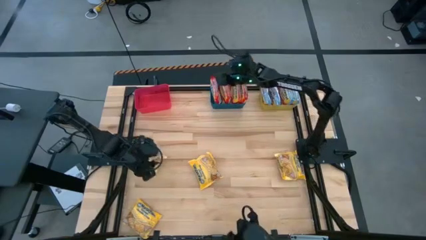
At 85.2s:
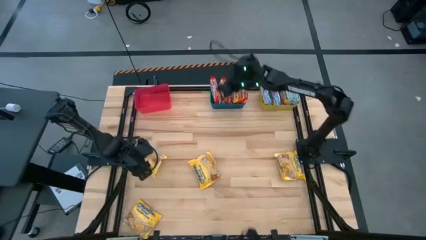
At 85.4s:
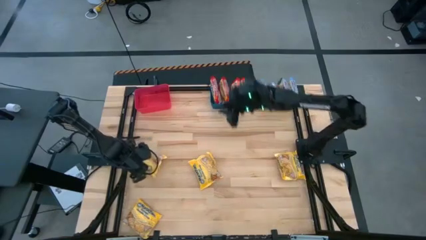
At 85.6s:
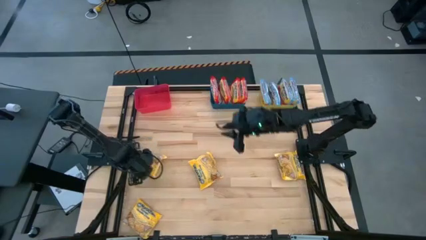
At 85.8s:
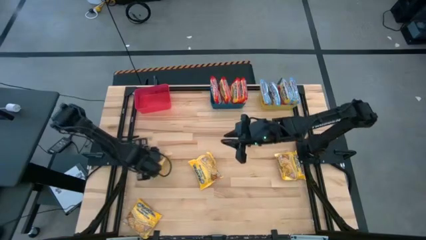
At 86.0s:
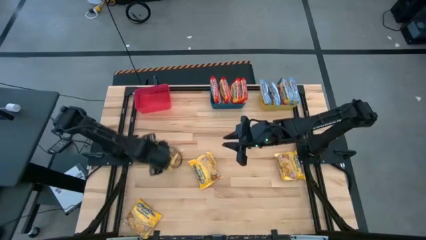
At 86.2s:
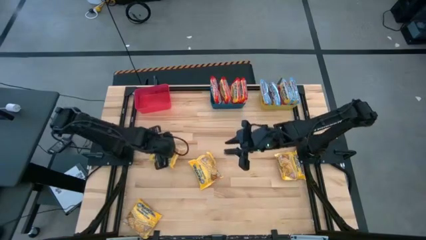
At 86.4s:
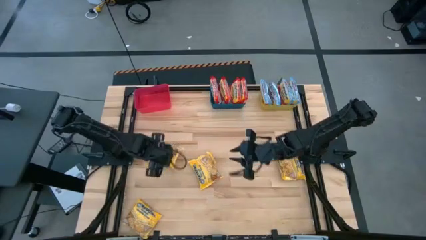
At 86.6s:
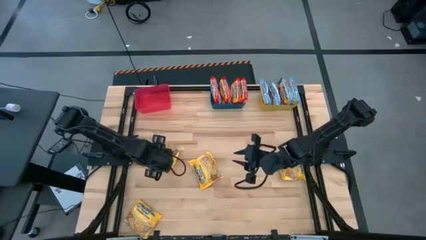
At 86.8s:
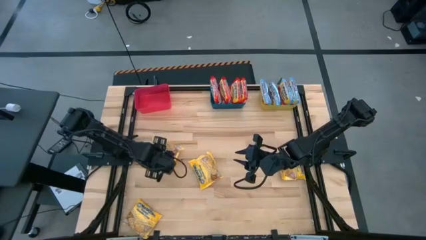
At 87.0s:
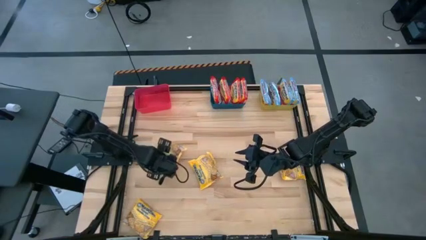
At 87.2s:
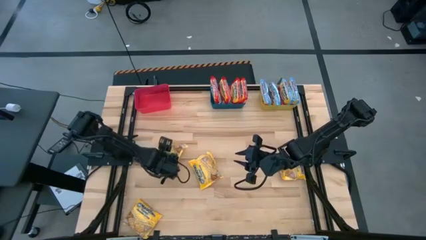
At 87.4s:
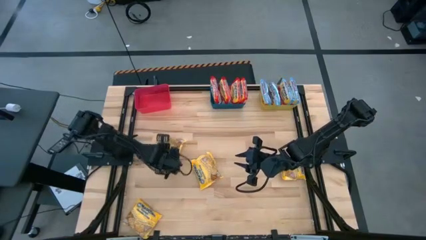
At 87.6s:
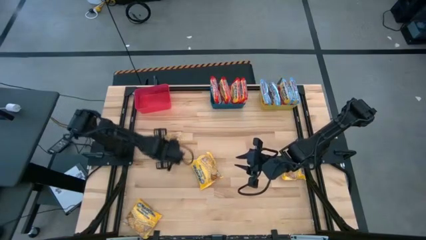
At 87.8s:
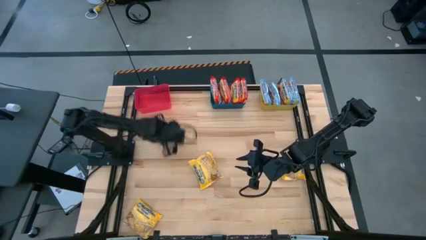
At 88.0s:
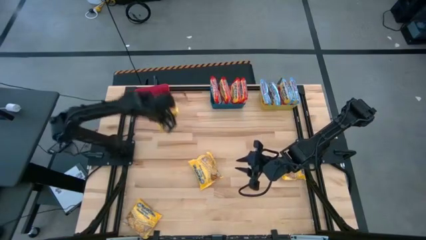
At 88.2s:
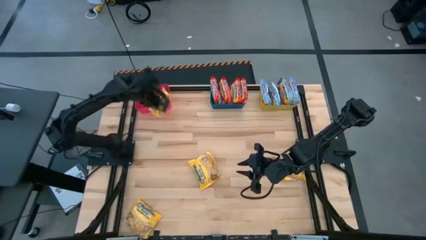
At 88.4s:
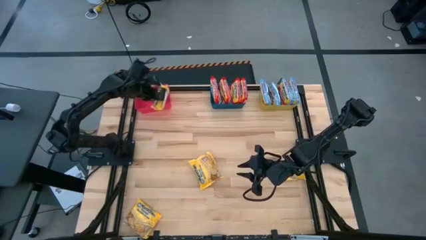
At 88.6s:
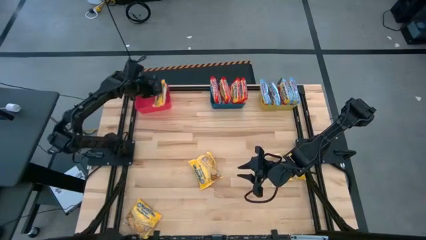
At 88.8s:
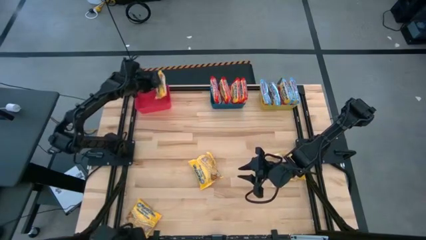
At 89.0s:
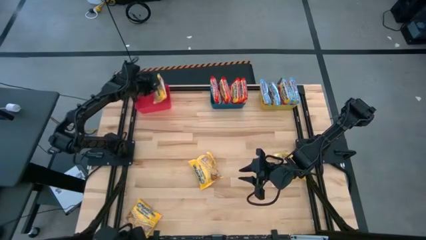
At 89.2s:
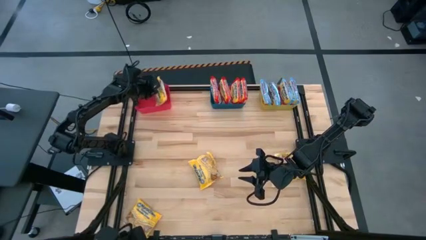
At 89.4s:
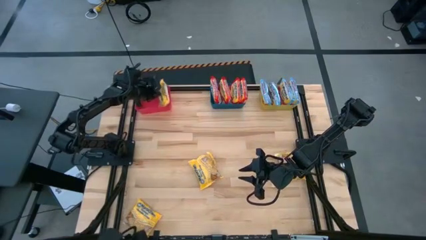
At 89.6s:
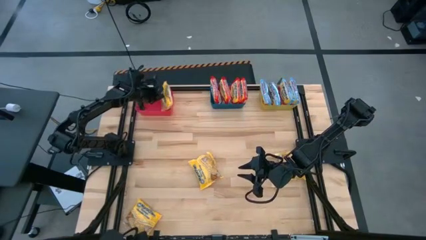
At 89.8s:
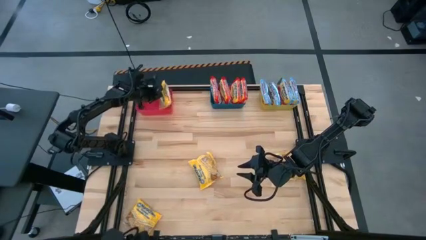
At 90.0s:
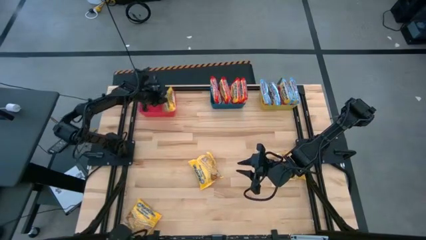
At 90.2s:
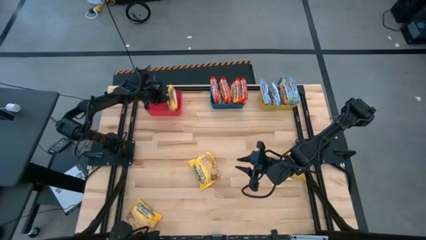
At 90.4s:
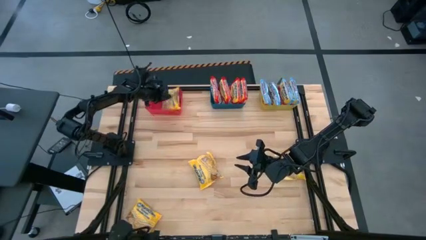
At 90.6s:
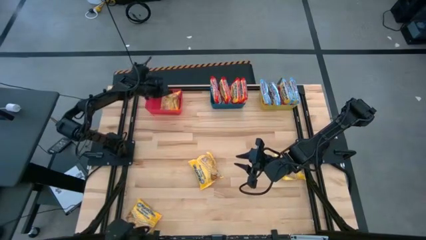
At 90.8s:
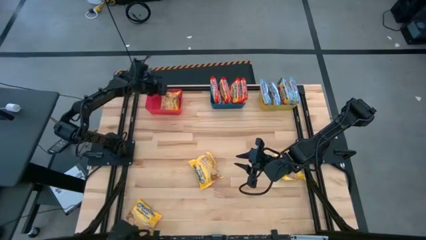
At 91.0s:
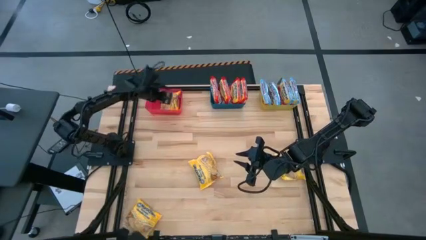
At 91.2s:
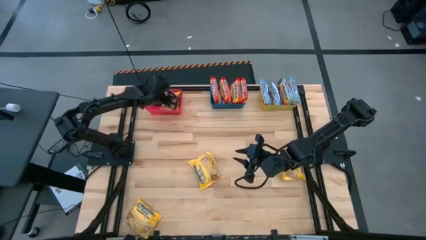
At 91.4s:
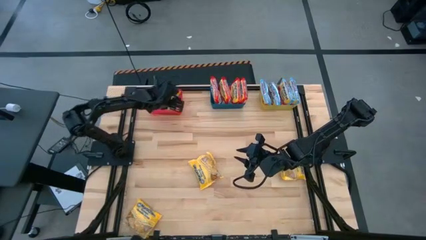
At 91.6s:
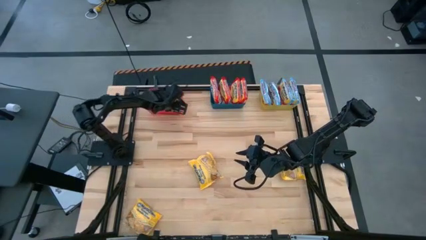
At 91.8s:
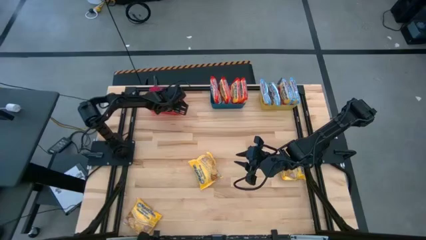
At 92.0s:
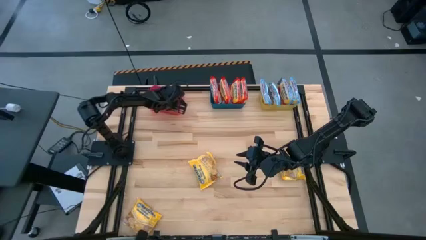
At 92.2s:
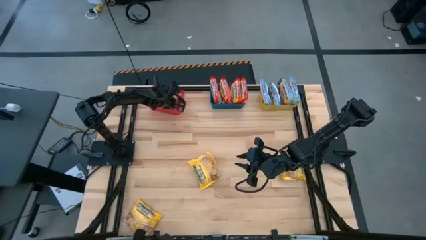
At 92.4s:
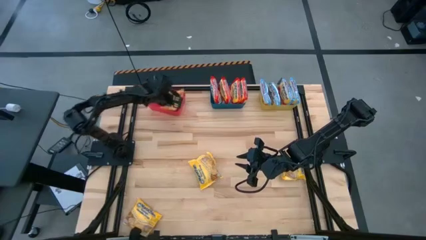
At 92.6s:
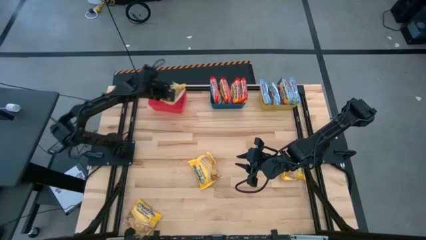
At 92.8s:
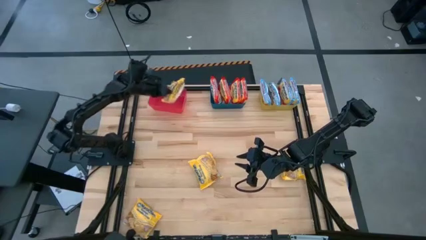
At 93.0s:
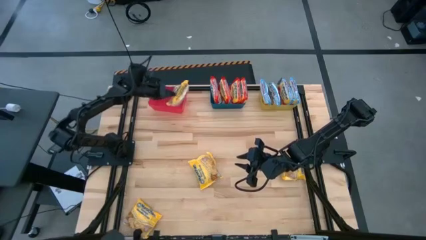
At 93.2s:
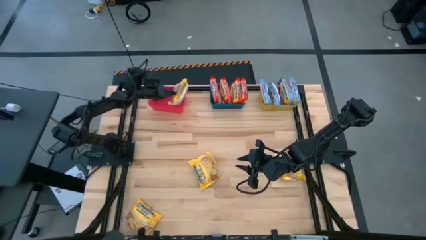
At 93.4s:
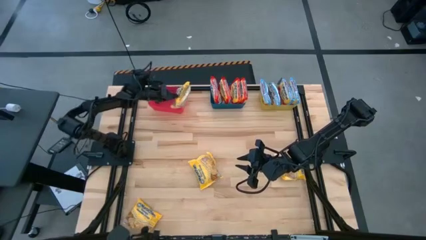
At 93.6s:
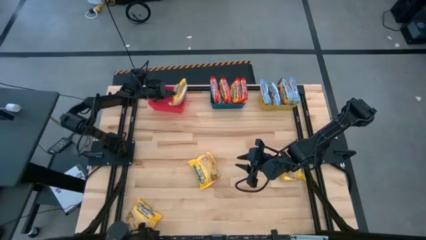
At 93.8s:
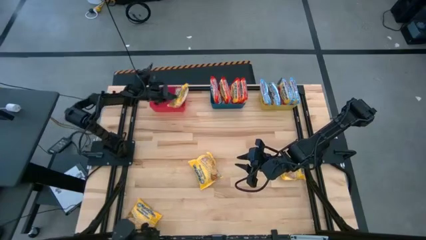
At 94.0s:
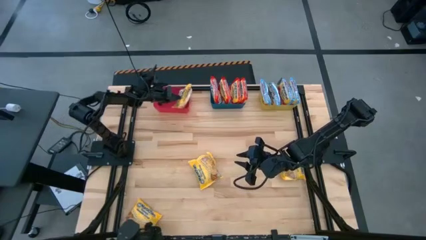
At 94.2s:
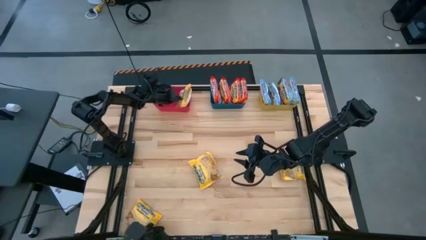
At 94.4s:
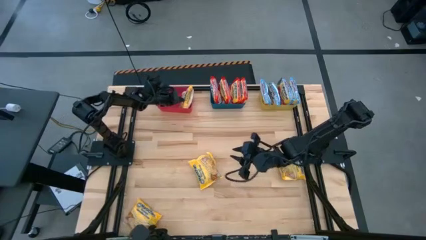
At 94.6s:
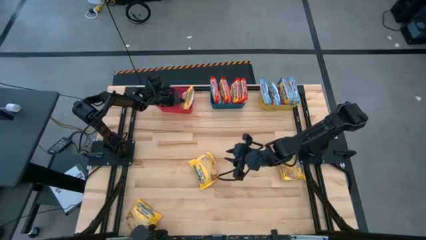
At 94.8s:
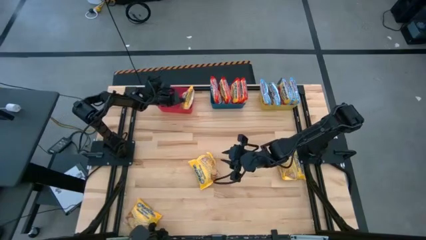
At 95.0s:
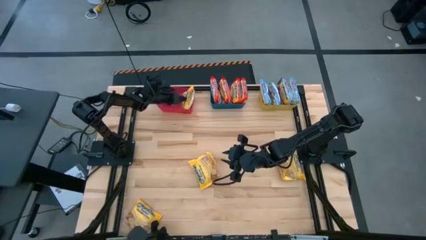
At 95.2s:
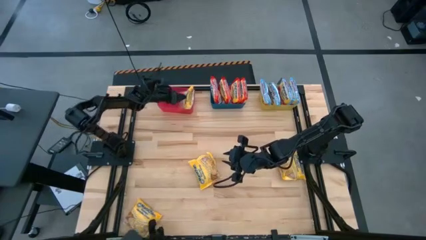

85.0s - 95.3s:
Task: Sort Maruchan noodles
Put the yellow noodle pack into the red bin

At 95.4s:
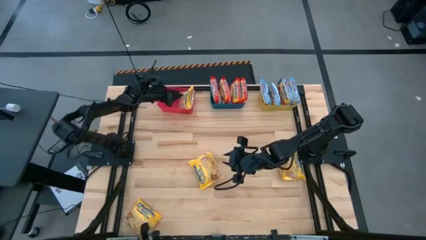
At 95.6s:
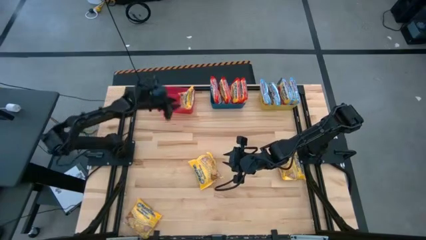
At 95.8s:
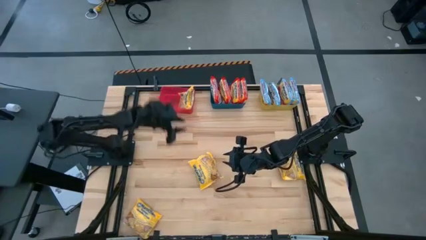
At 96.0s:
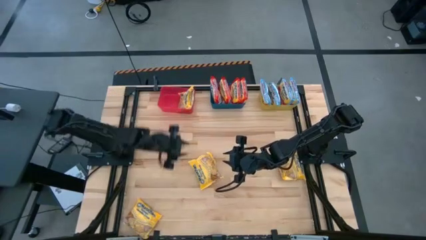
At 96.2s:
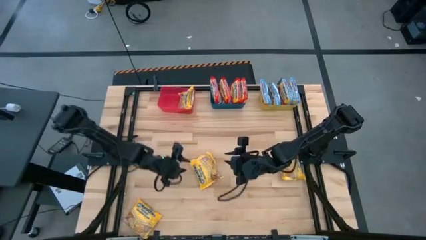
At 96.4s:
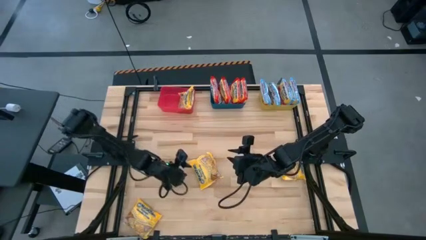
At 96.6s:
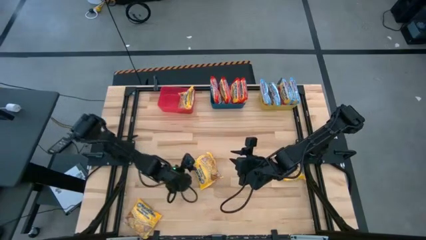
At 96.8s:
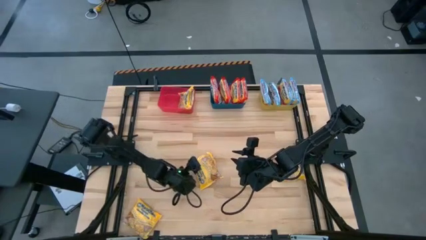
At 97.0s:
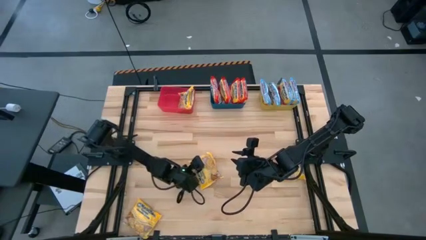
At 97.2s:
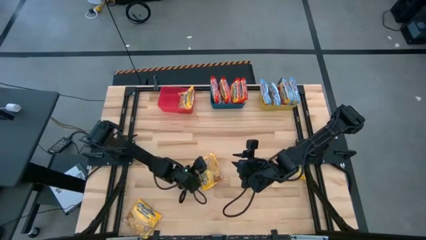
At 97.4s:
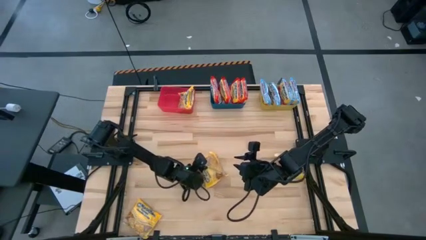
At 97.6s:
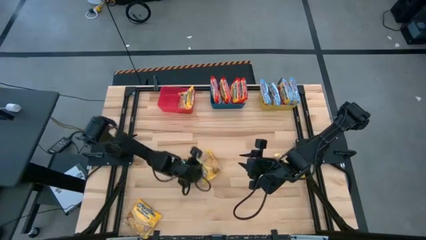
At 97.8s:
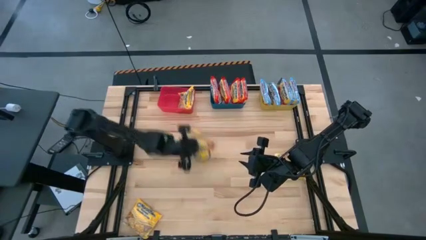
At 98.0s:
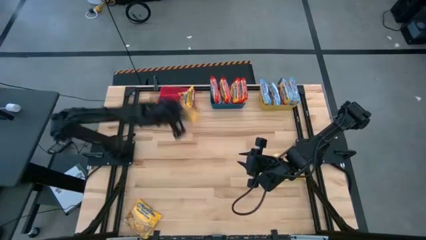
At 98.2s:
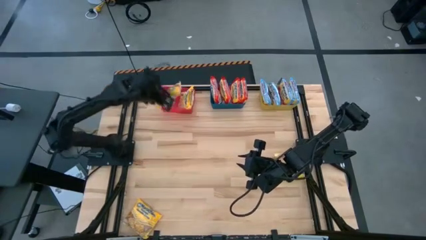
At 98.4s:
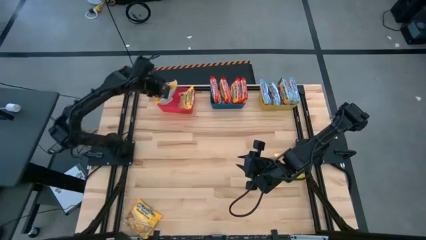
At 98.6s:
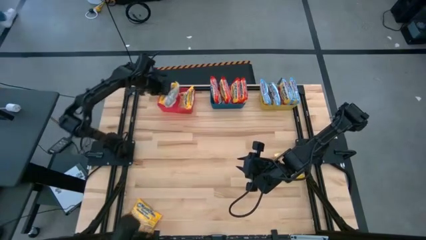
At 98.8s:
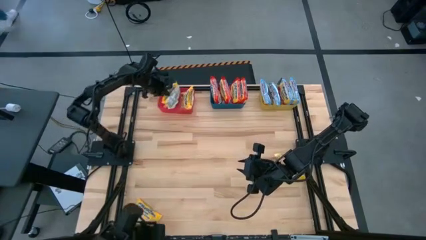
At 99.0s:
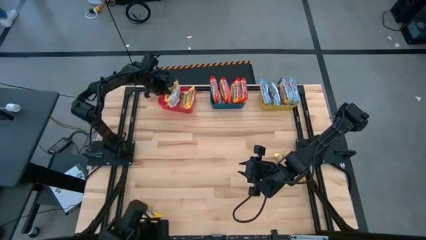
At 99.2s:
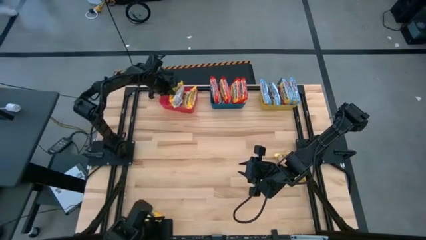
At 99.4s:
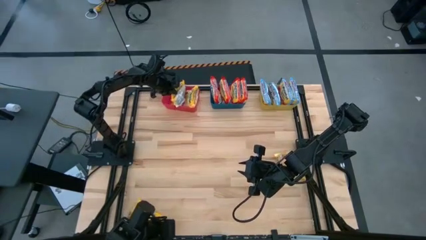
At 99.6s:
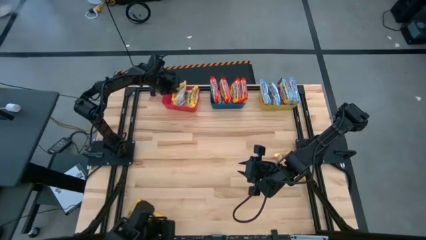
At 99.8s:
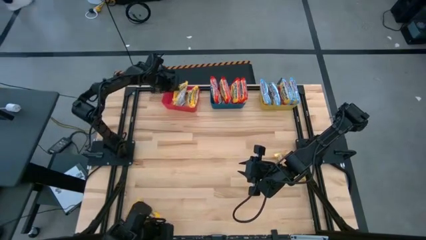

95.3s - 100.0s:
Put the yellow noodle pack into the red bin

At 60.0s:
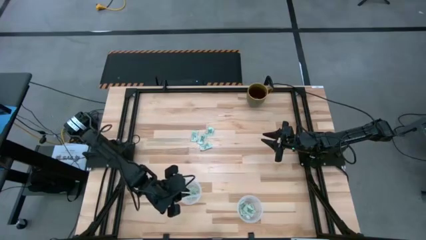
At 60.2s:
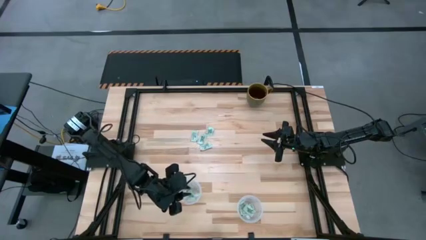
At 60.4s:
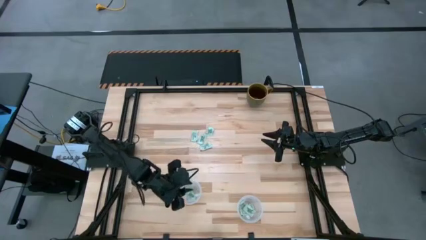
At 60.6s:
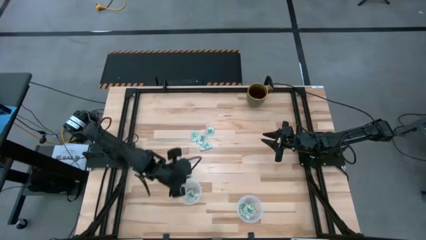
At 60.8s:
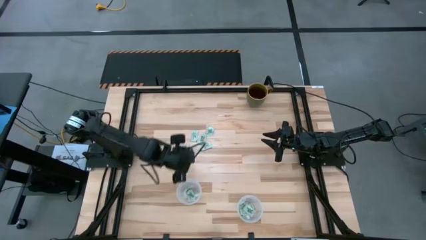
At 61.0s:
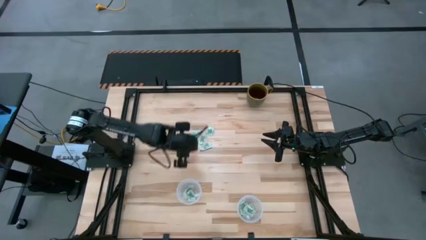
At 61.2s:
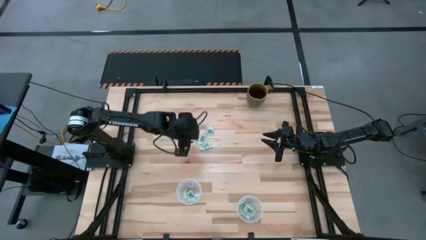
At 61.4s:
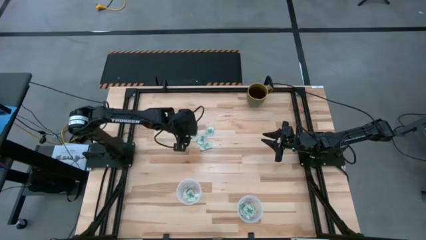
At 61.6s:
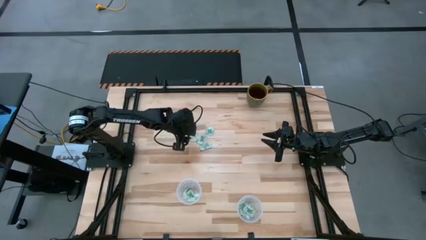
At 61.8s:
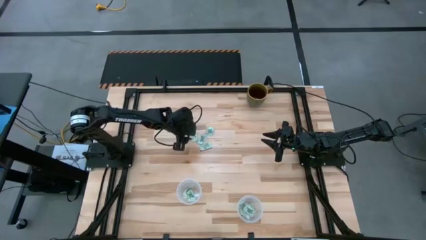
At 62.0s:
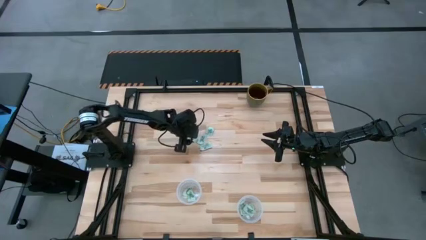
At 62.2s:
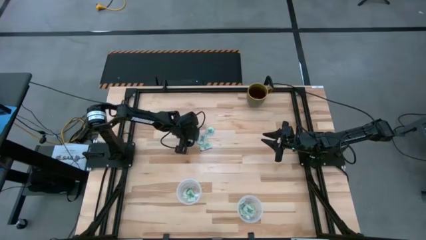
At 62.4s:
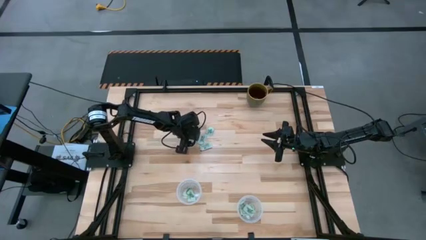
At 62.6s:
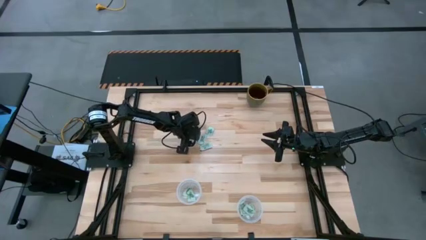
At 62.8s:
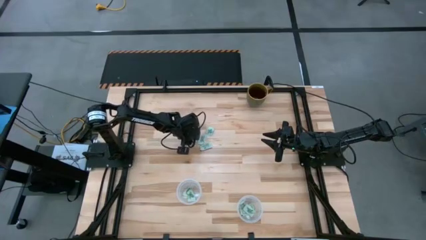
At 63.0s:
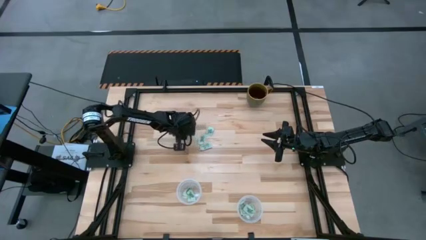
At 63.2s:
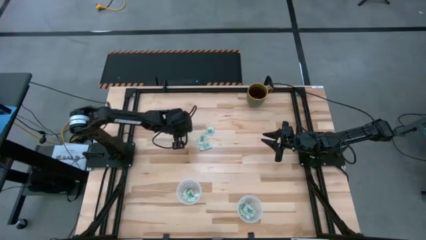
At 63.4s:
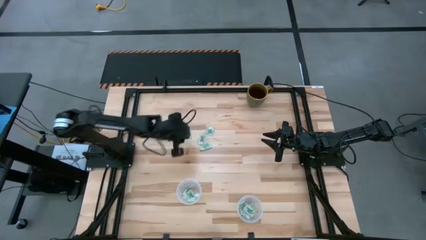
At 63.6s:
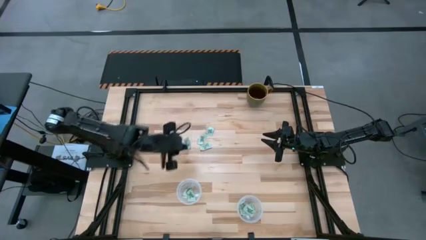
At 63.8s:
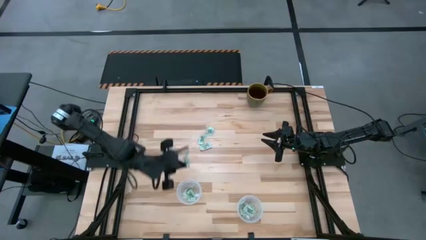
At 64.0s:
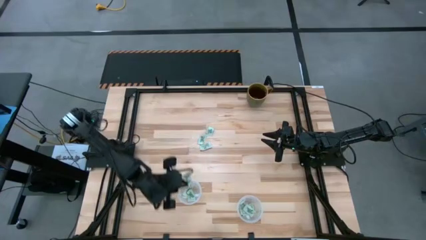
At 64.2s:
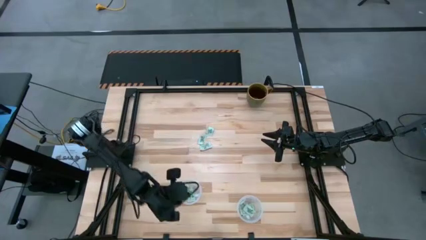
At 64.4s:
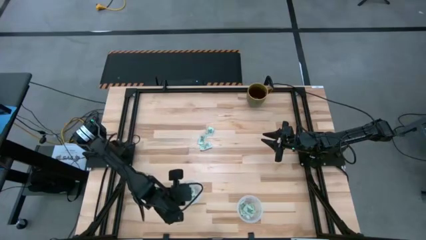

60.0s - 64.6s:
Task: Pick and place items into bin
Put the stevia packet into the left transparent bin
